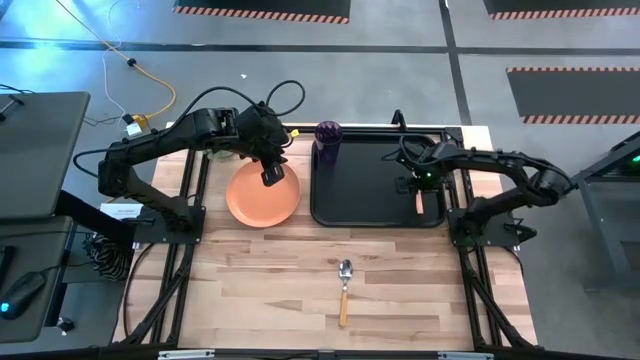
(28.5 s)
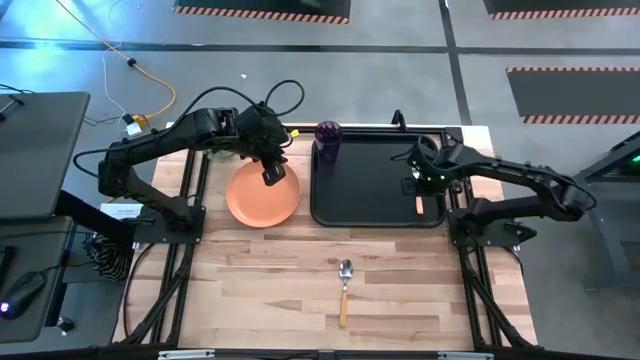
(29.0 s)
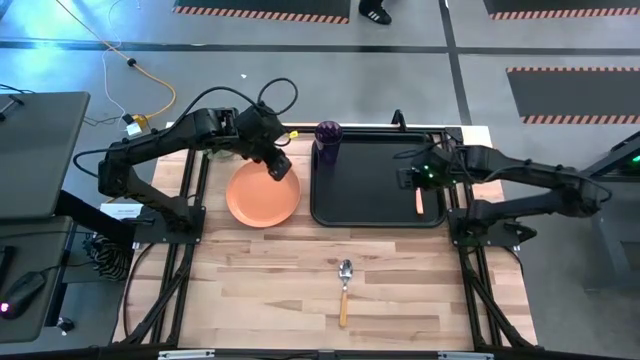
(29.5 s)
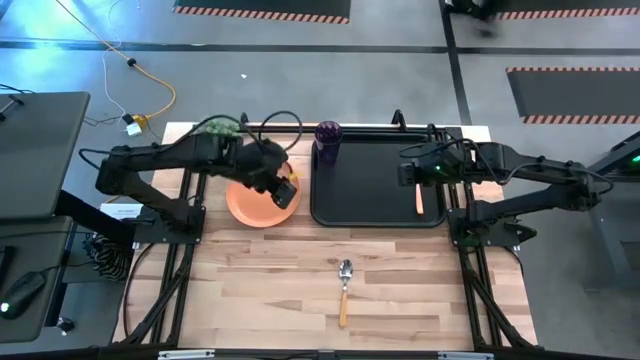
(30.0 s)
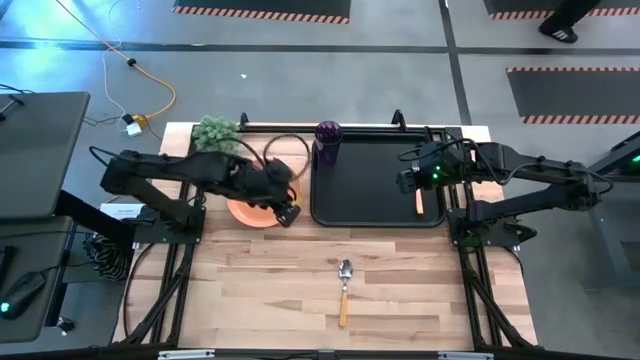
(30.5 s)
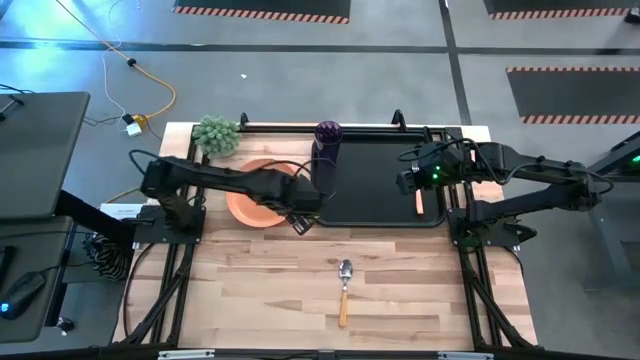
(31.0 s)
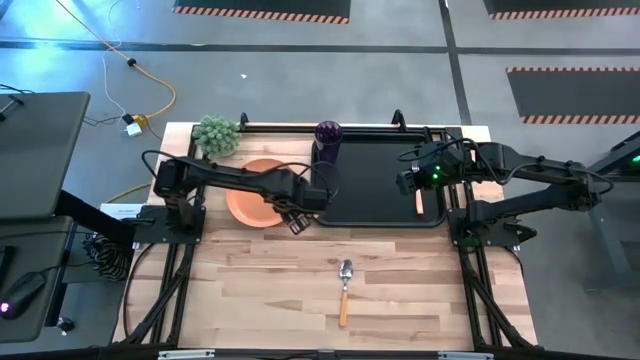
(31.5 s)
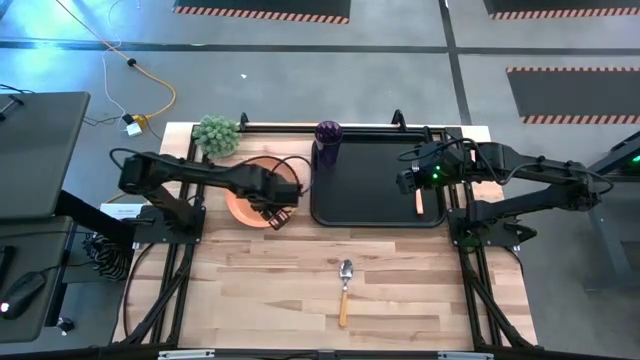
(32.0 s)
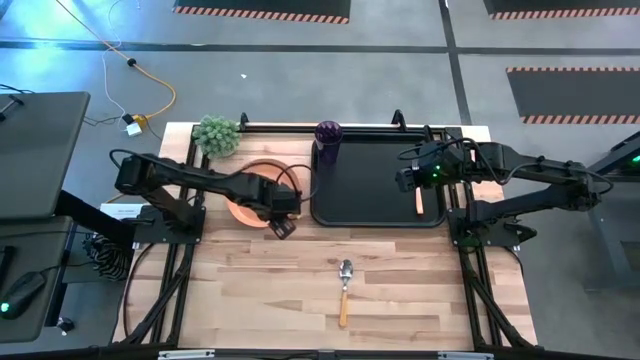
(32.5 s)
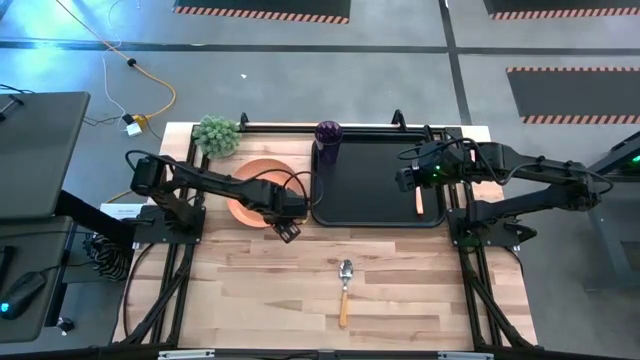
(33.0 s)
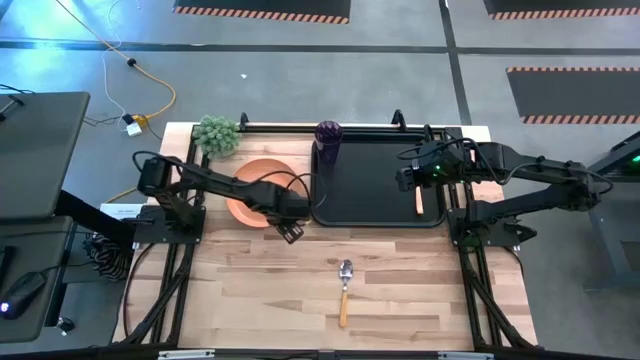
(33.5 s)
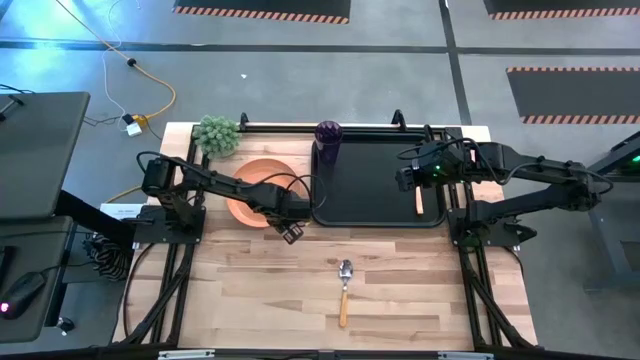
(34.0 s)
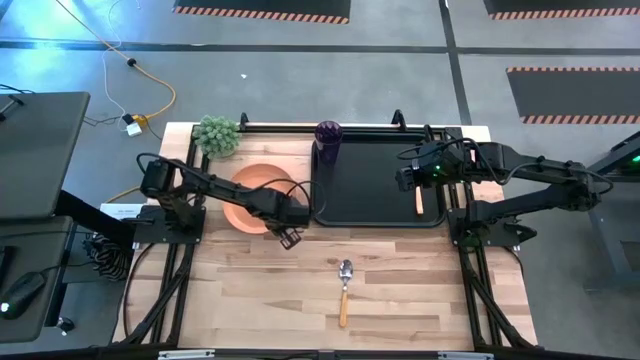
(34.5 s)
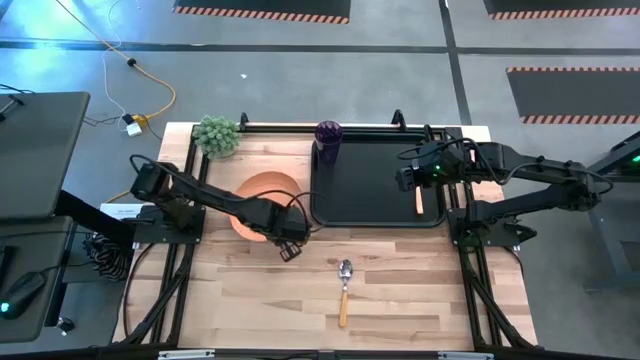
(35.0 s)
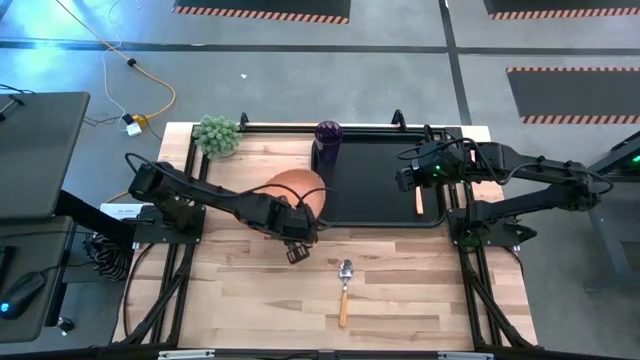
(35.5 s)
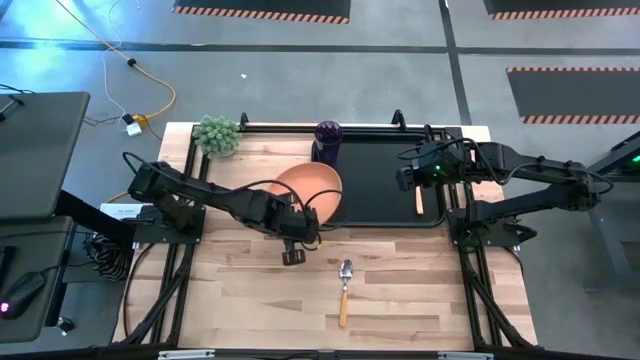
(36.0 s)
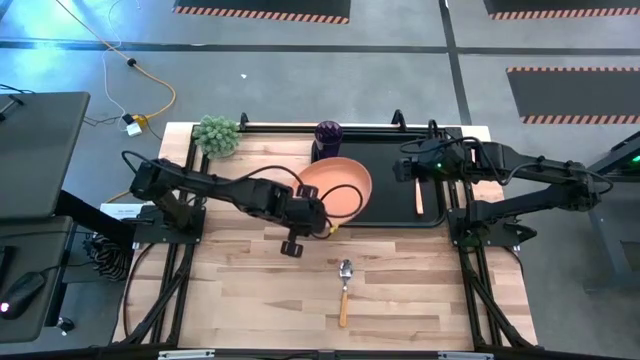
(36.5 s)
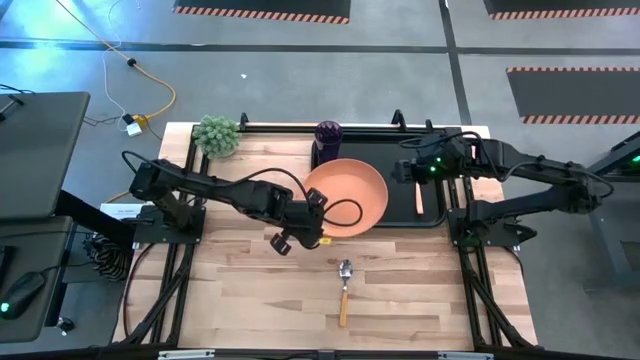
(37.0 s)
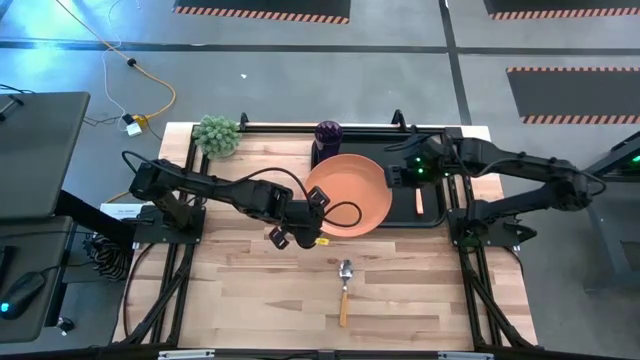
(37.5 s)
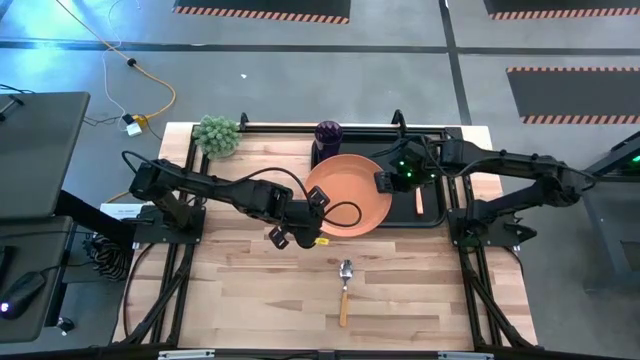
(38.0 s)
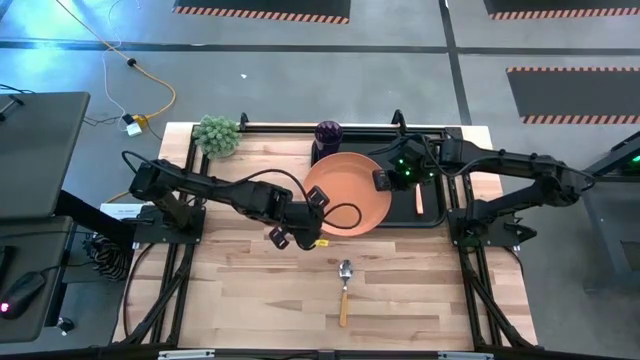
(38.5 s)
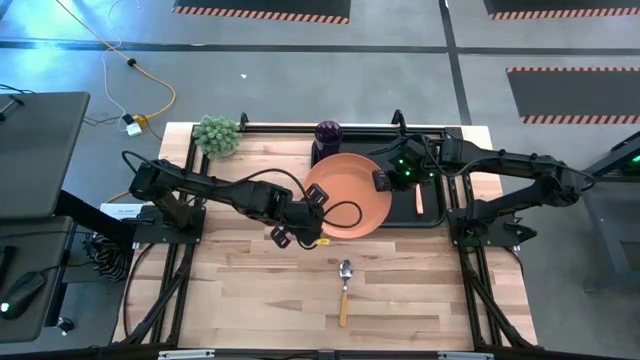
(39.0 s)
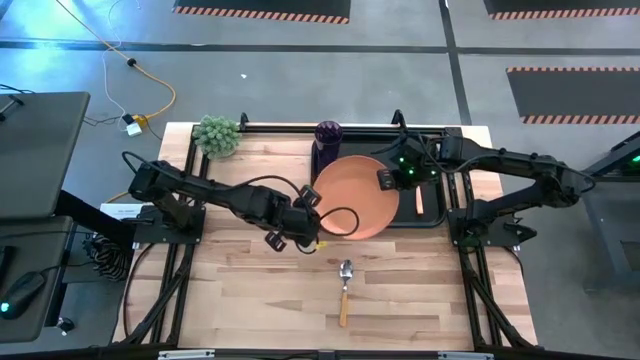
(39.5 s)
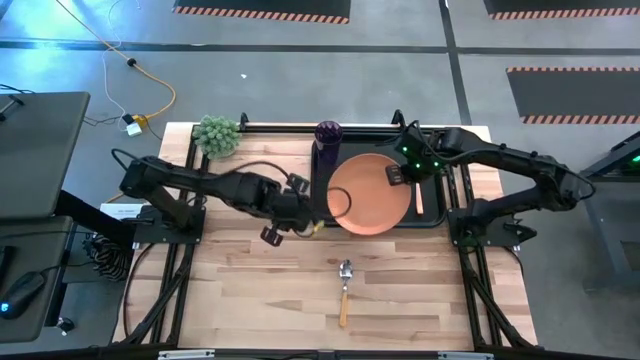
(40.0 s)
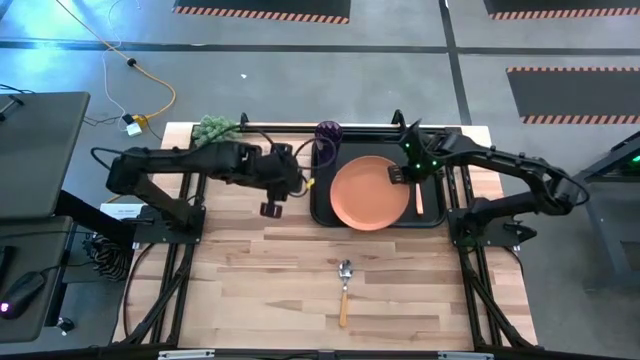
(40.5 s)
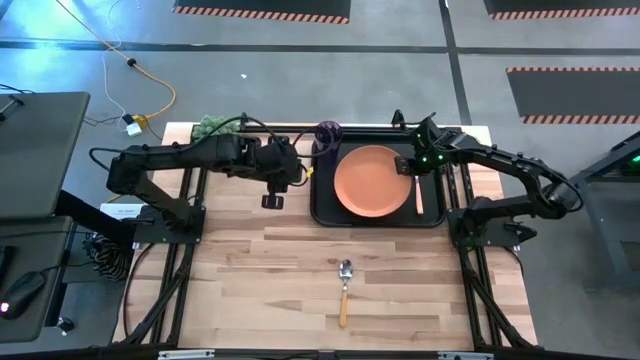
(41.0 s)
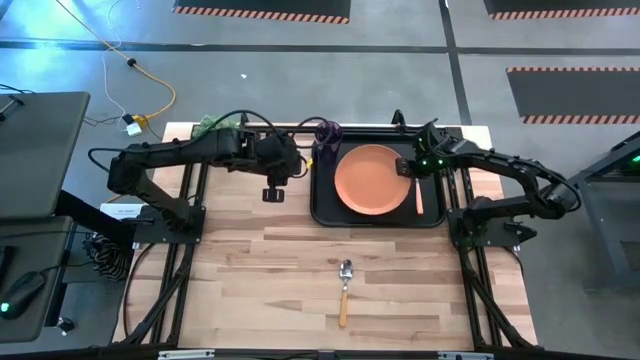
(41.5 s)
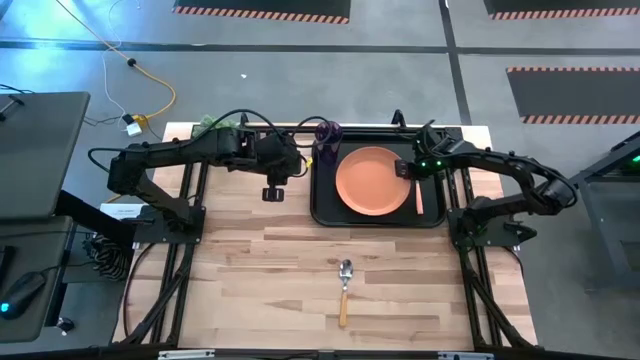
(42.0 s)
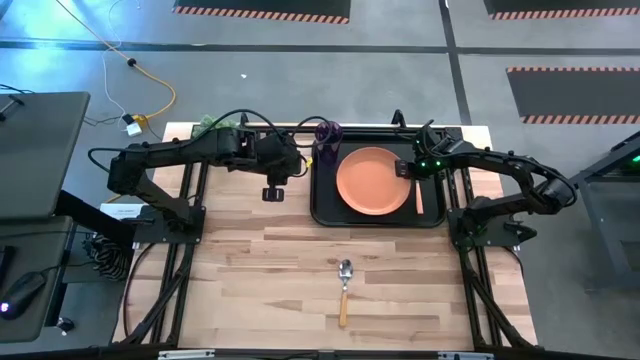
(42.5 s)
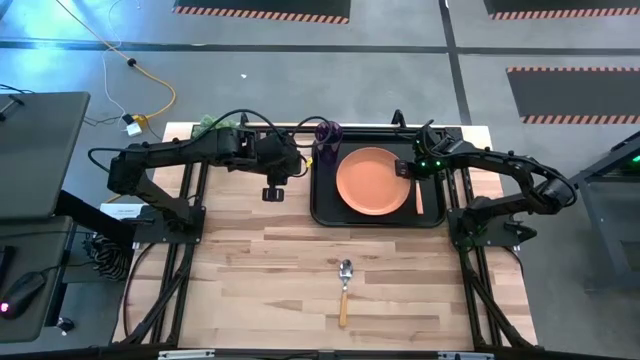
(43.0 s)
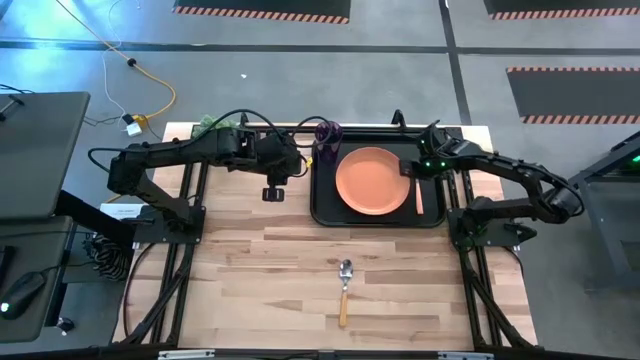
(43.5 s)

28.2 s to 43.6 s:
Task: Pick and place plate/cup/fork/spoon on tray
Put the orange plate to the center of the black tray

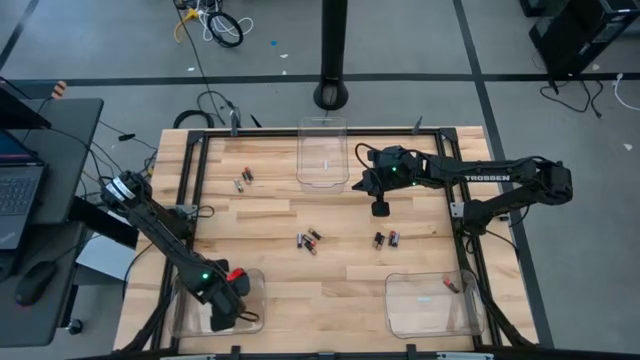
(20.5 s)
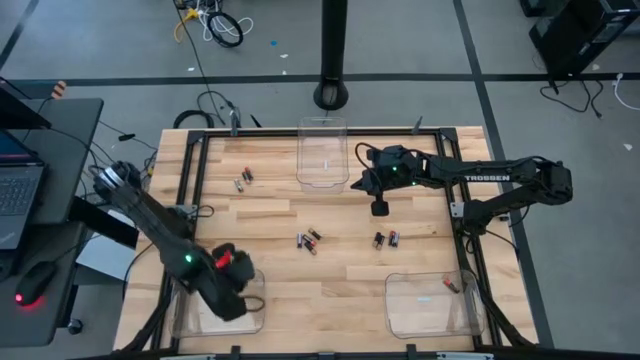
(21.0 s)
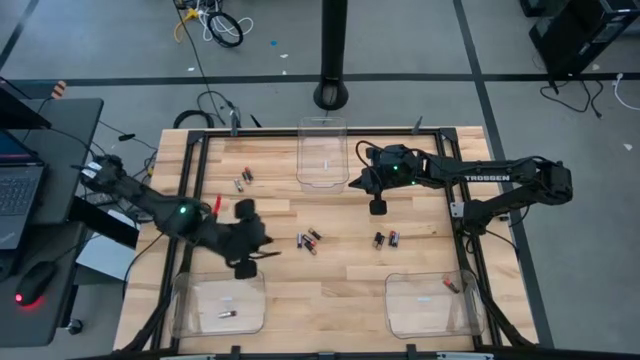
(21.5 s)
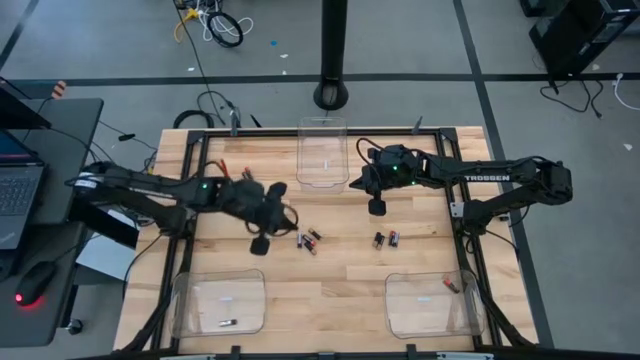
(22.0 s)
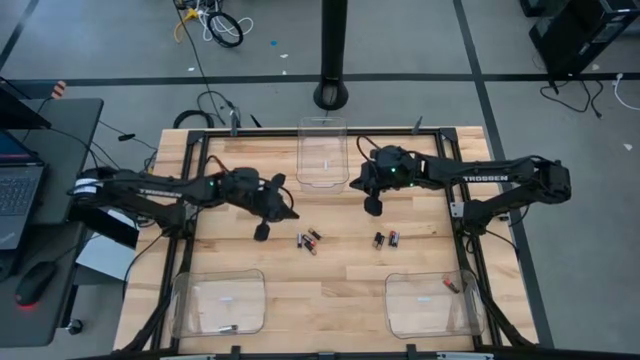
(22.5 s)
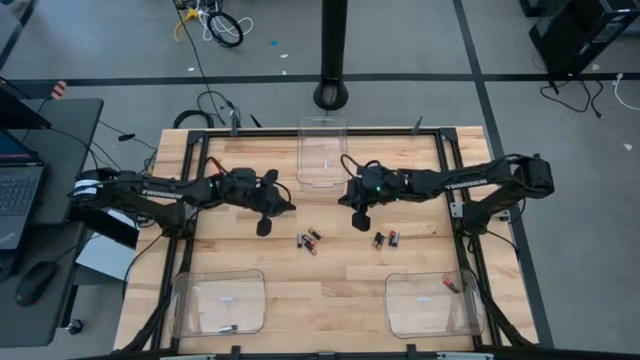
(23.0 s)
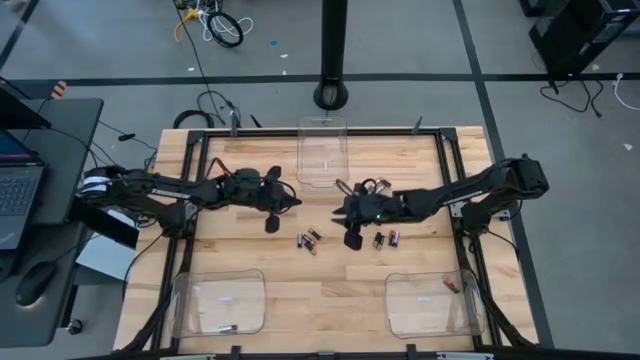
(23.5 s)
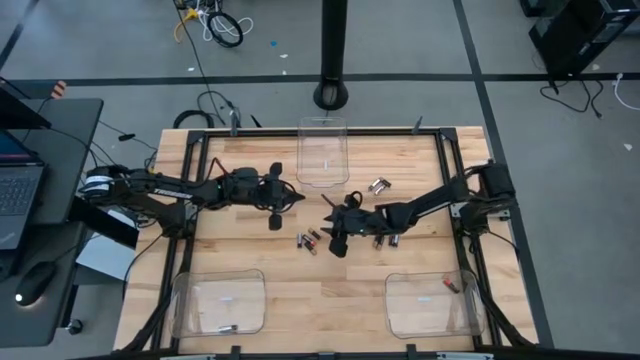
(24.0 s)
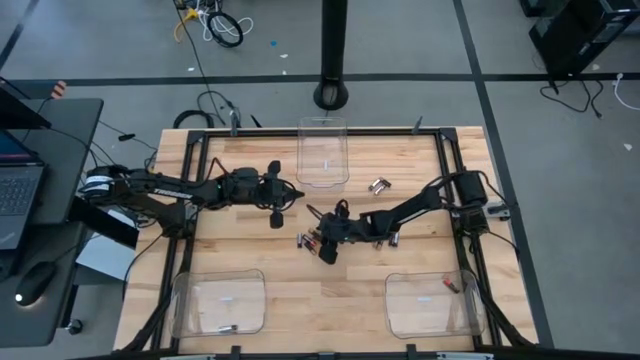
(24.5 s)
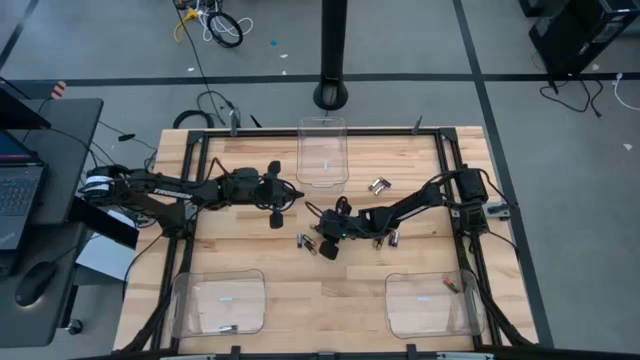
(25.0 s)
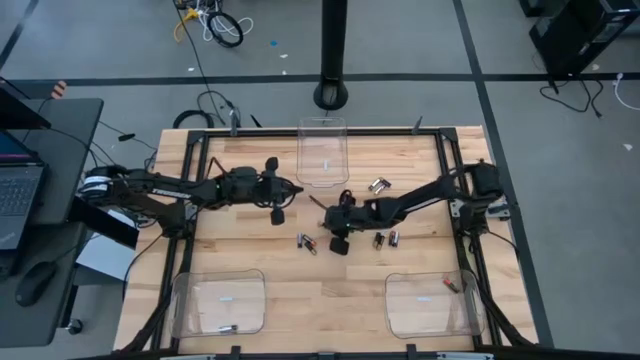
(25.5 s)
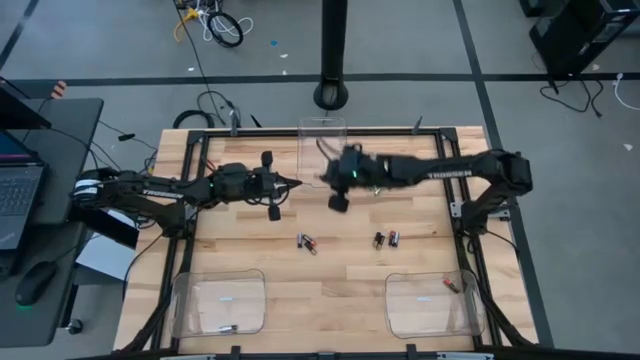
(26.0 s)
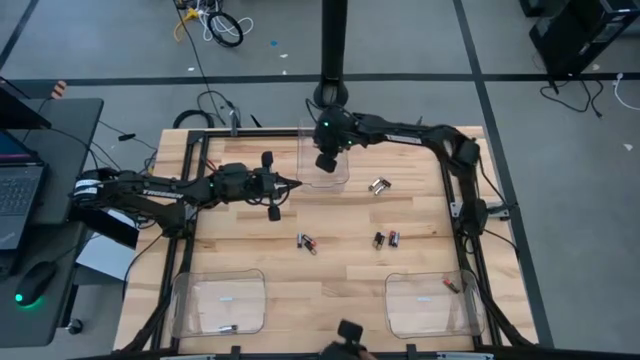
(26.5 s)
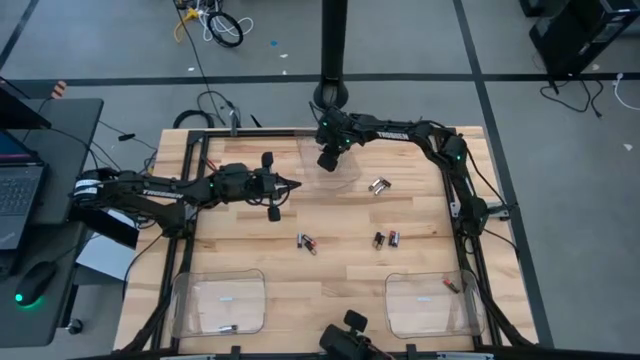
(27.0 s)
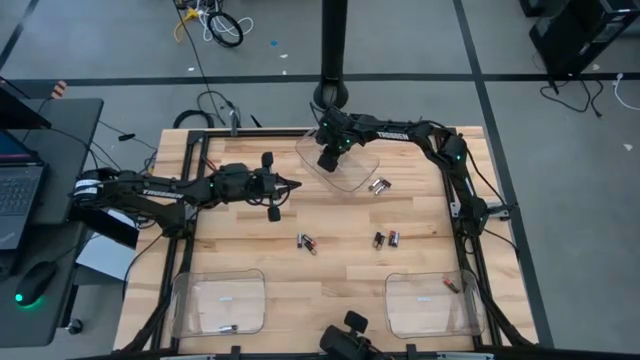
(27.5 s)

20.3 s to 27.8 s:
Task: Sort batteries
Put the brown battery into the top middle transparent bin
